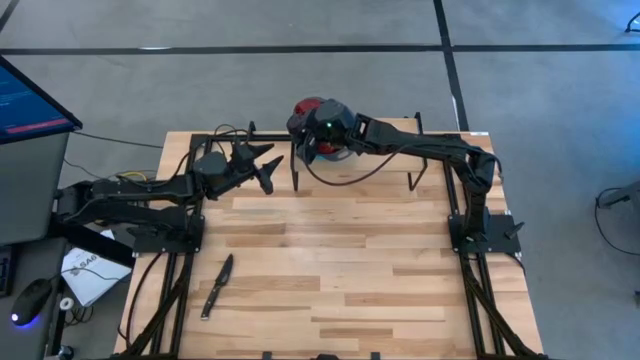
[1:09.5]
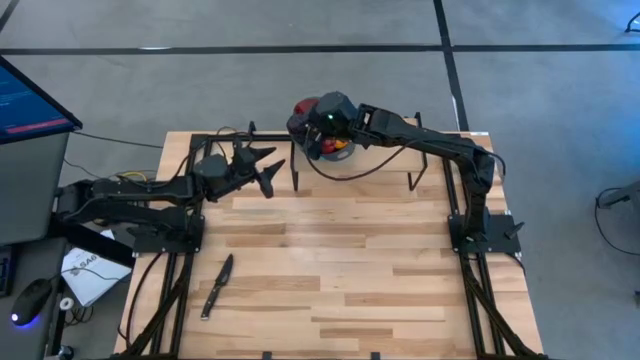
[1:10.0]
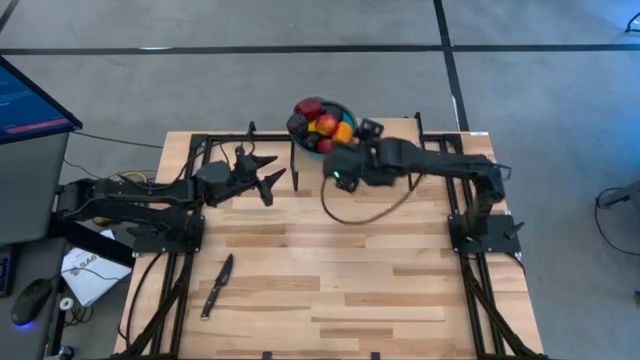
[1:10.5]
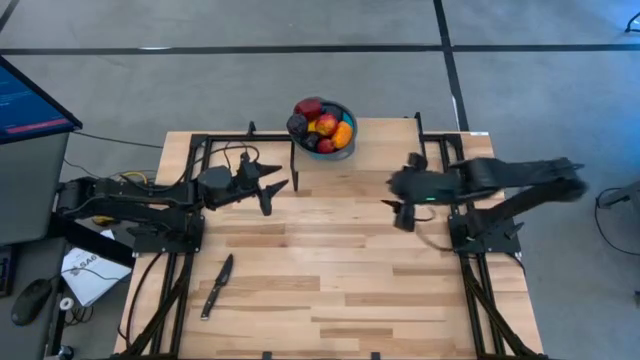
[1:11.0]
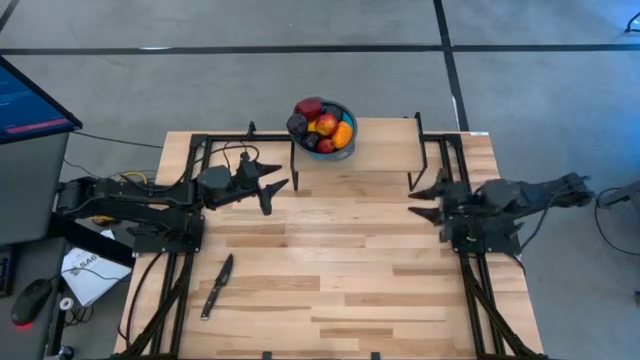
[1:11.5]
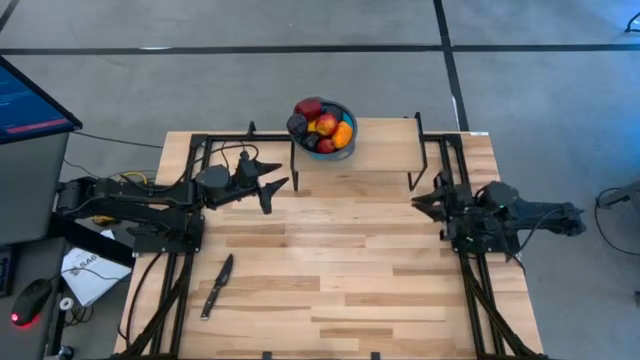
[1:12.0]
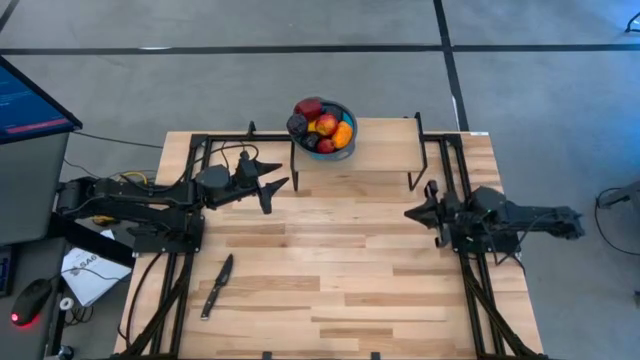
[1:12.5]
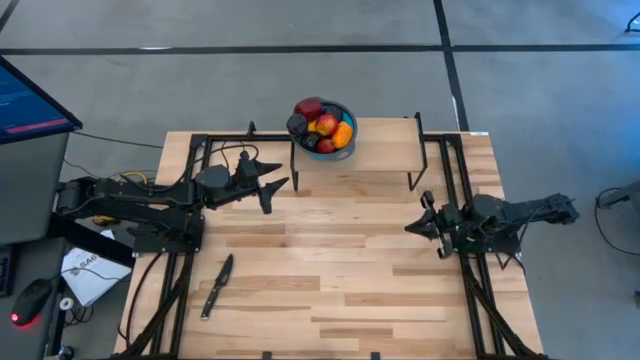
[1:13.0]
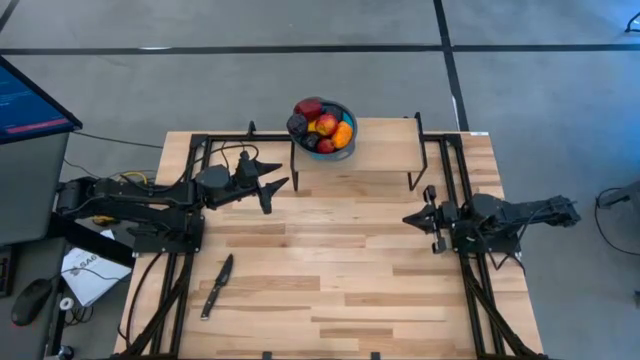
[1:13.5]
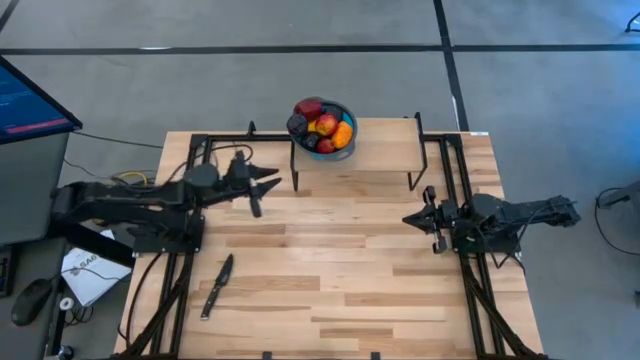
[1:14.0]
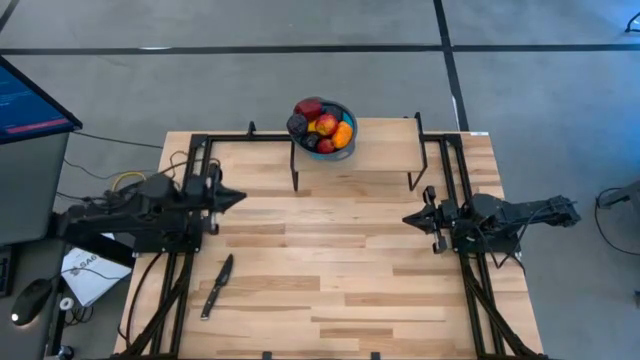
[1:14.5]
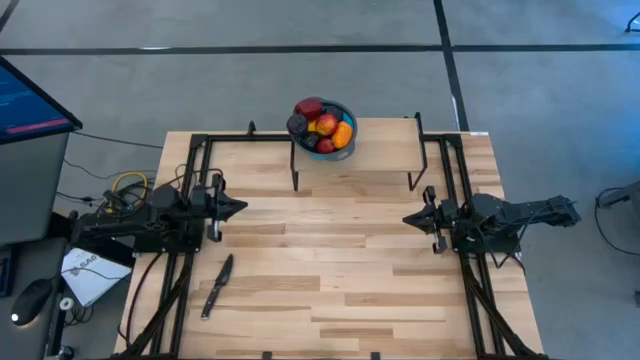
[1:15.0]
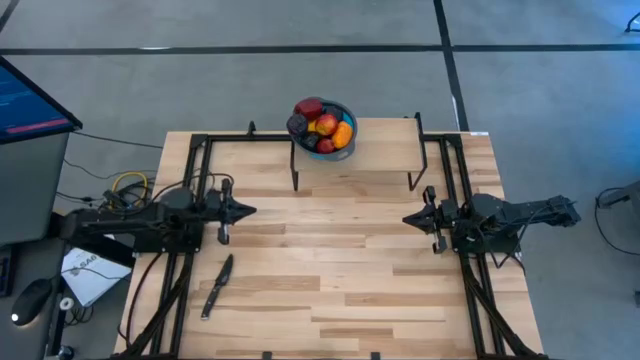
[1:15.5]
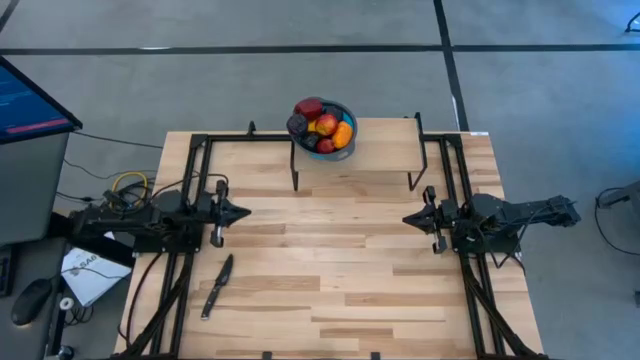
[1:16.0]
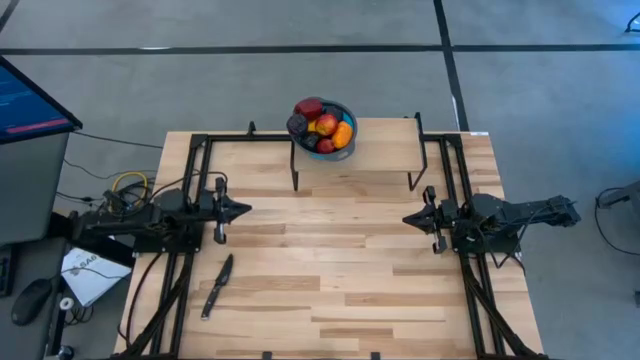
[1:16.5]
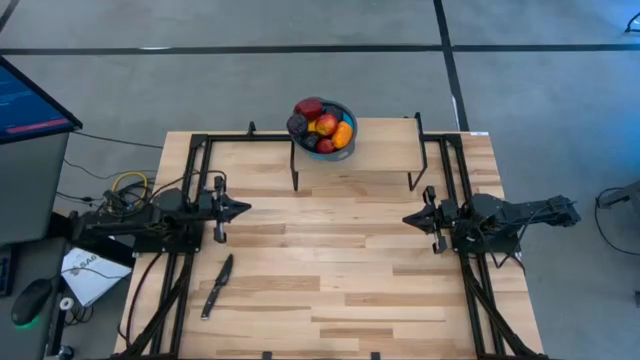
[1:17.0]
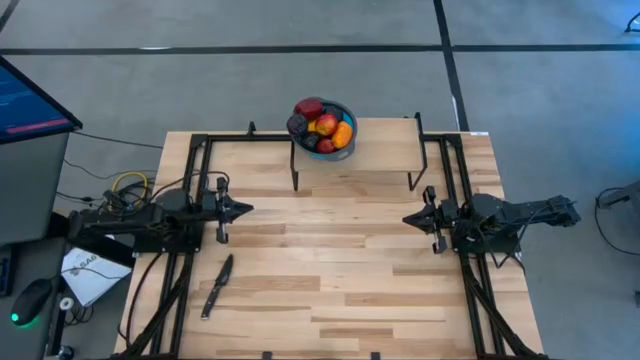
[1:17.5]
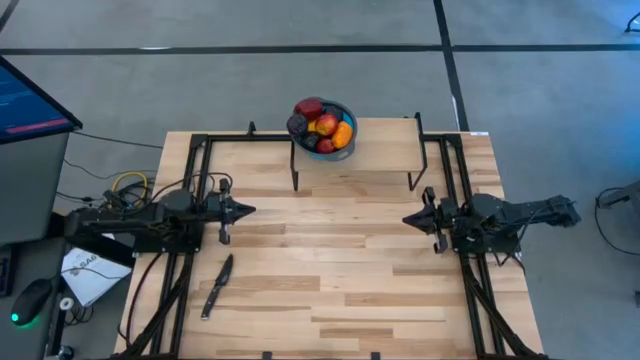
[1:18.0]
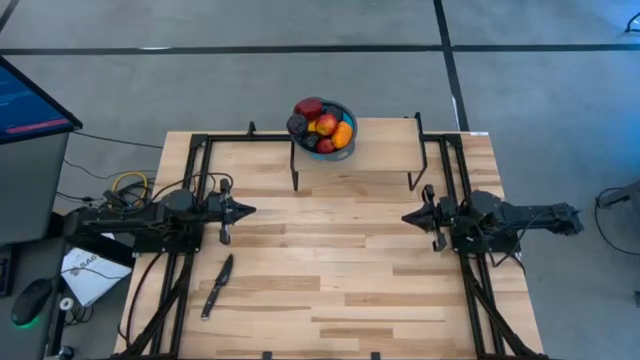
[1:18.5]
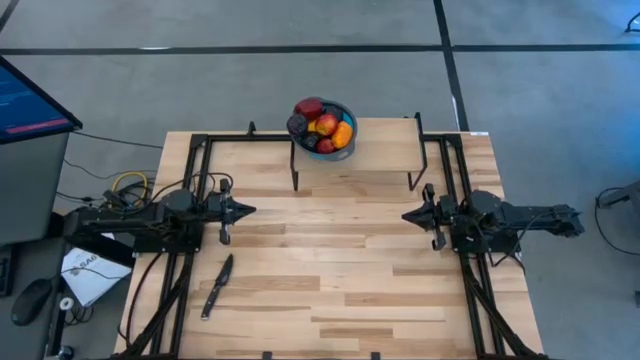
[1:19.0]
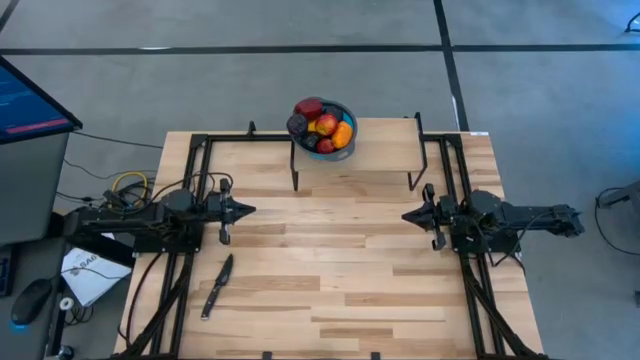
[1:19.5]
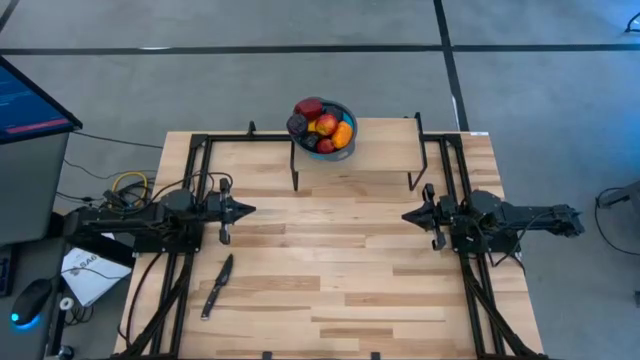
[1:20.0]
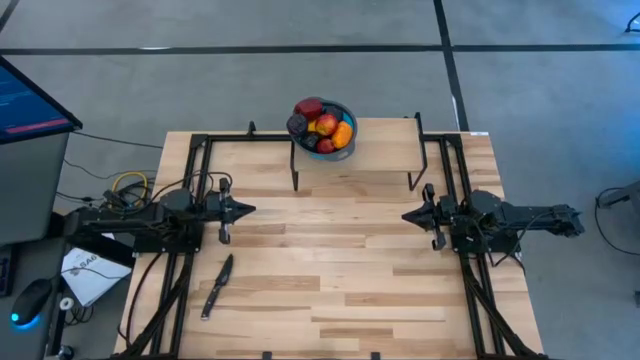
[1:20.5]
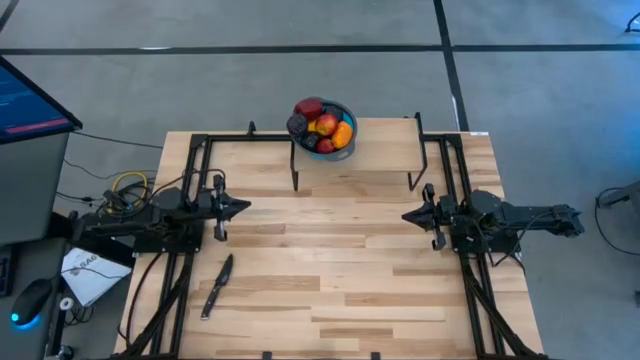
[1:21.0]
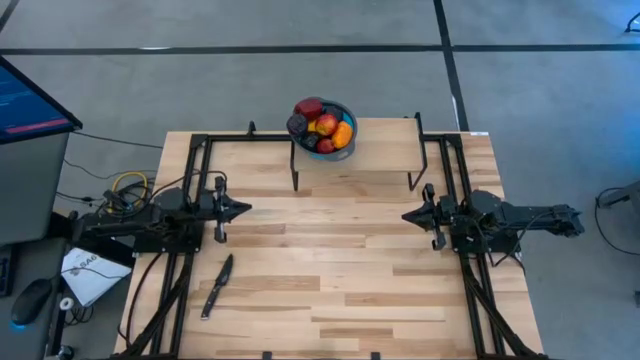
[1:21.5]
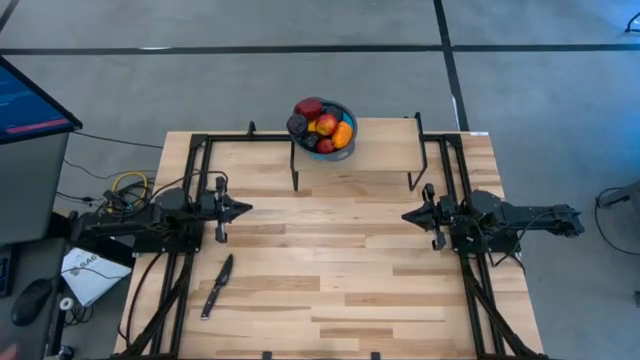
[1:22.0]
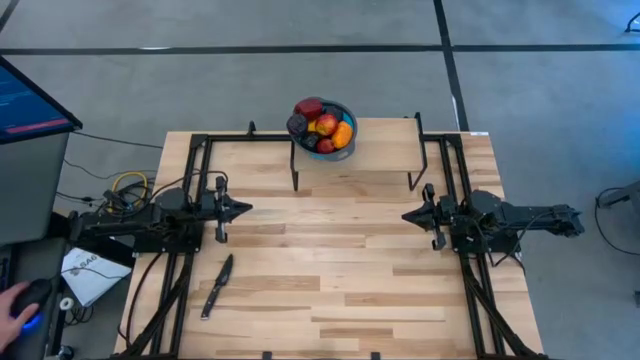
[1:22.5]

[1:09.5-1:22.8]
Task: Pick & Place Fruit
Return to Home Position

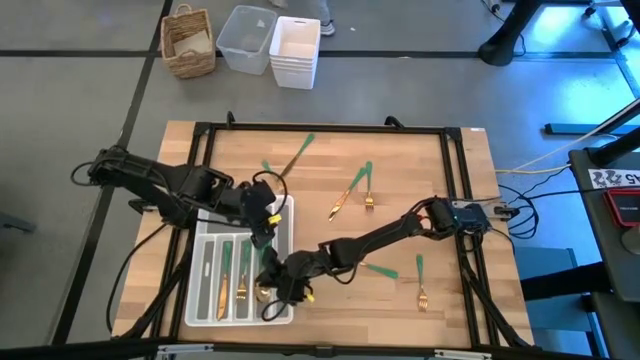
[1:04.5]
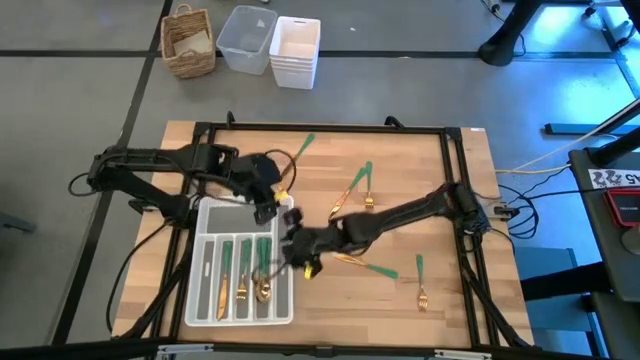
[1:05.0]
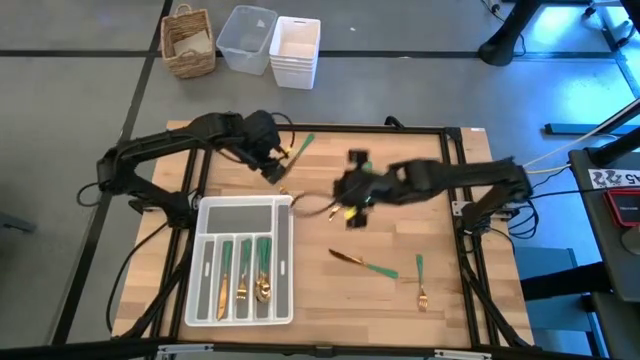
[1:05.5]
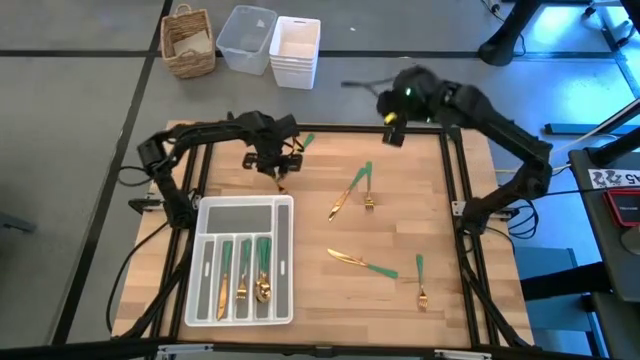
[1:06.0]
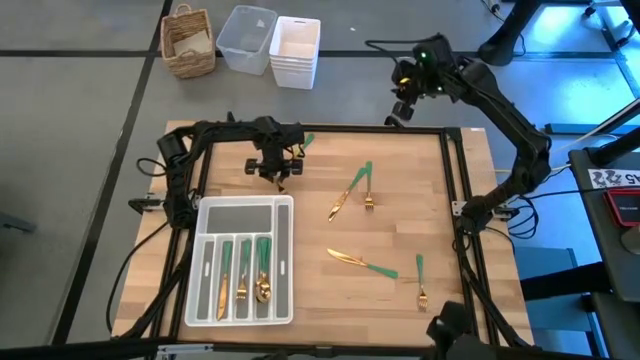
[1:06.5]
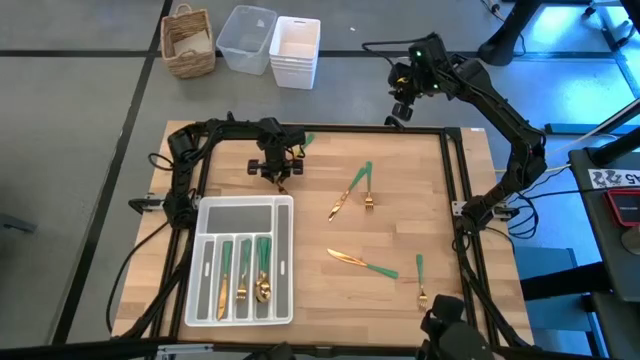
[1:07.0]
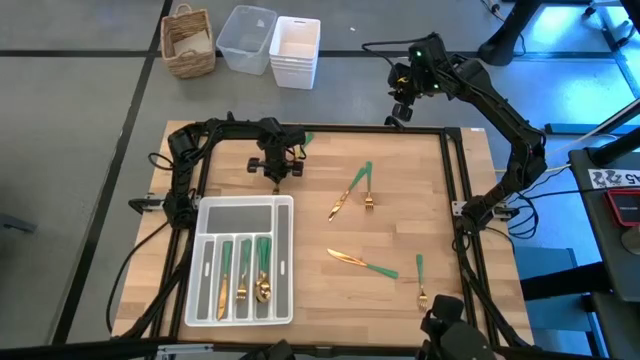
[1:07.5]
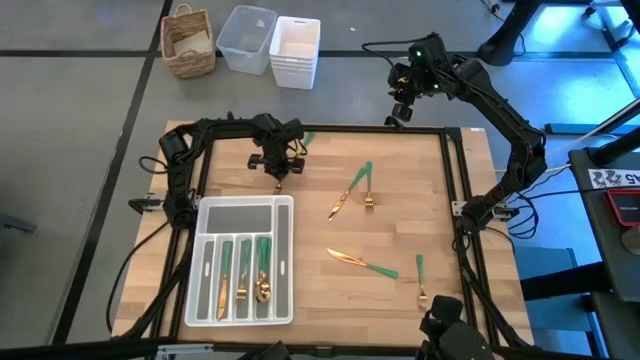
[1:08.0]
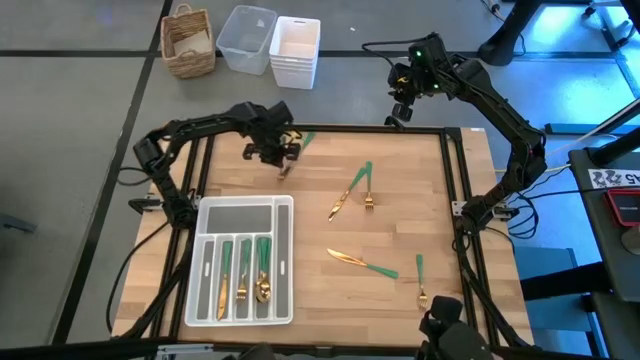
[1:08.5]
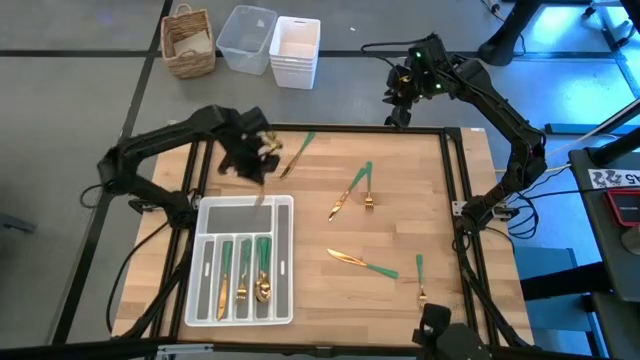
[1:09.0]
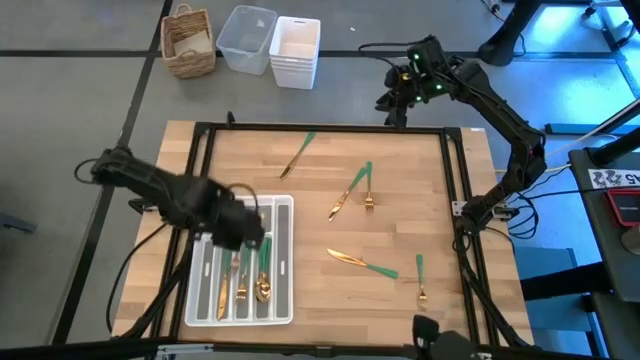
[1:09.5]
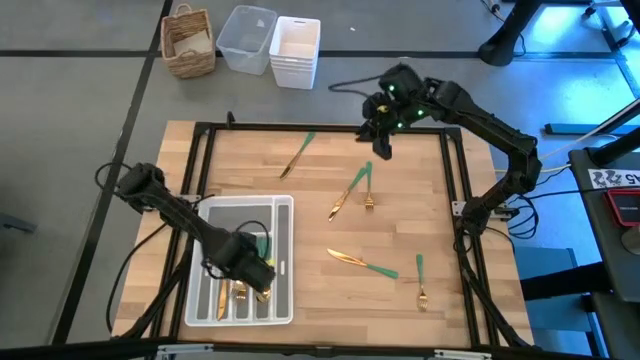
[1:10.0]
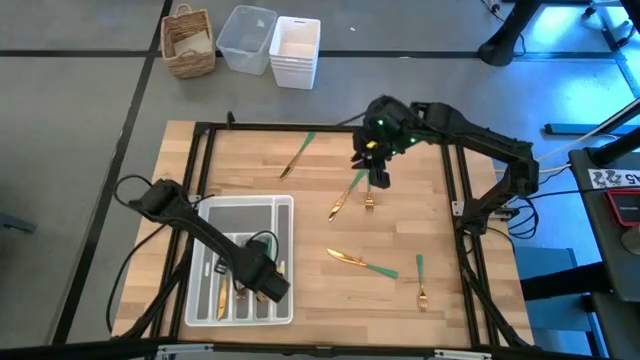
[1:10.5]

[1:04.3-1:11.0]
Task: Sort silverware
Put the green fork on the silverware tray

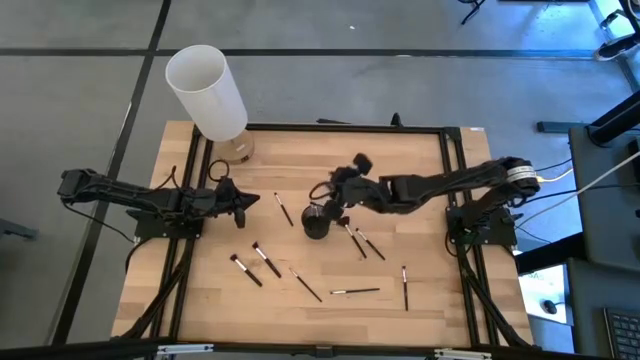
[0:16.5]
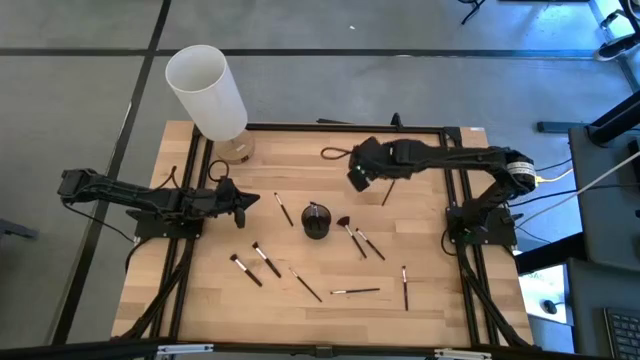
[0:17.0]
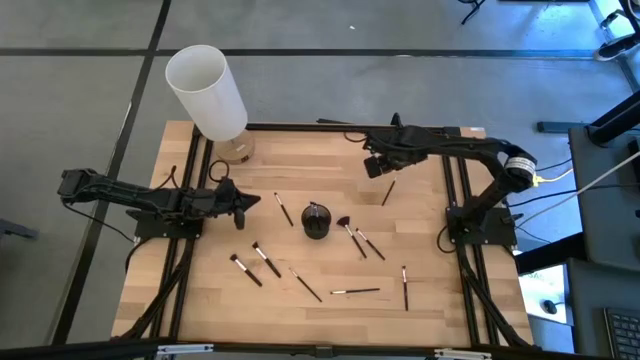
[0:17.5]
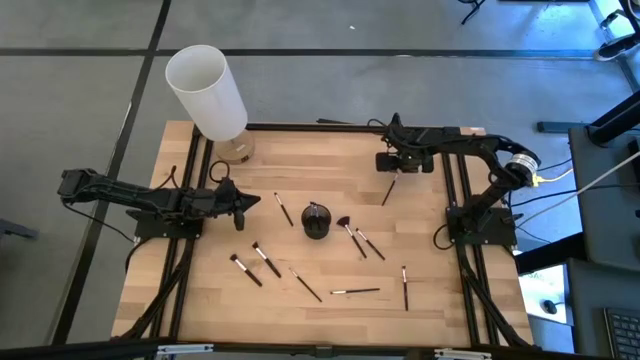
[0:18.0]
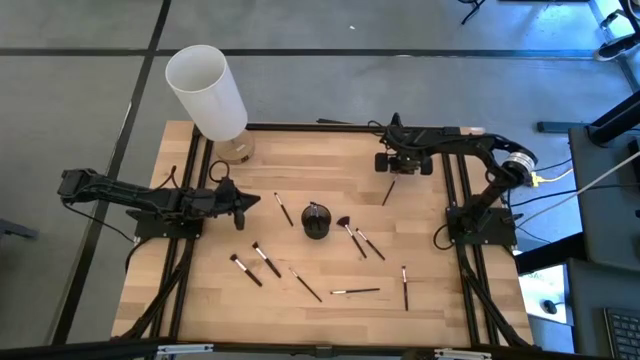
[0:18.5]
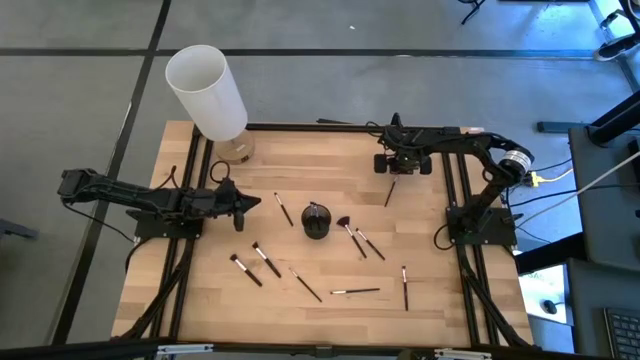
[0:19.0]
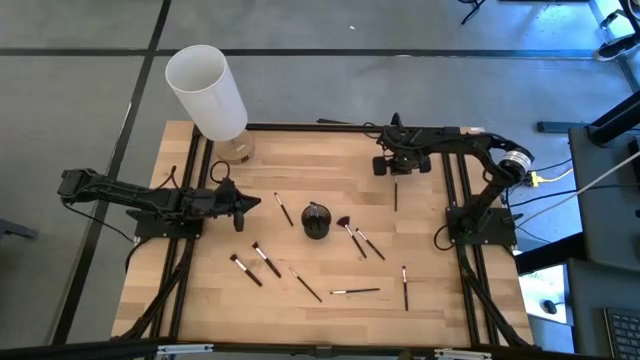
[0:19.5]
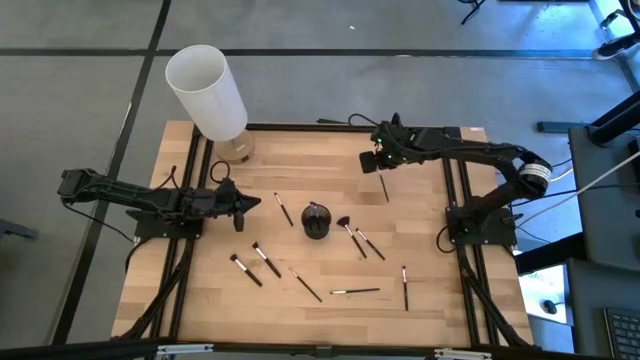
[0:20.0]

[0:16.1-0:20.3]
Task: Sort items
Put the silver eyeshadow brush into the pen holder
